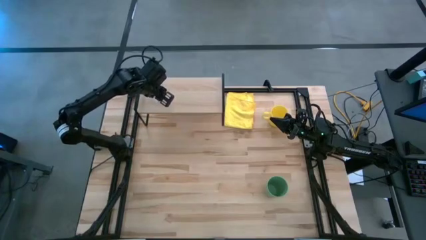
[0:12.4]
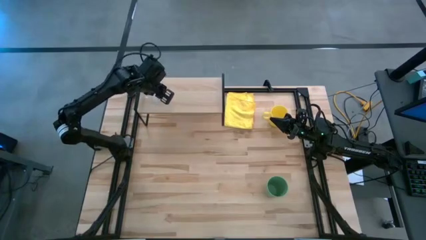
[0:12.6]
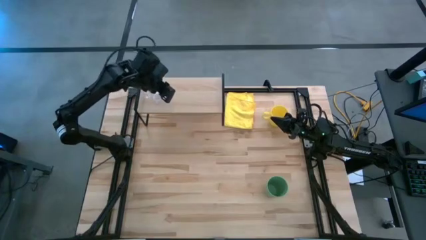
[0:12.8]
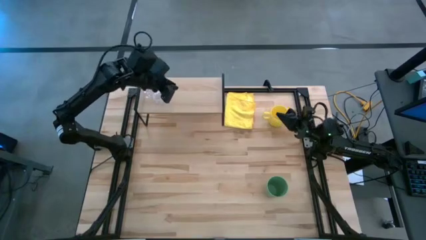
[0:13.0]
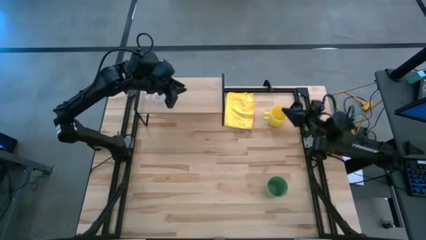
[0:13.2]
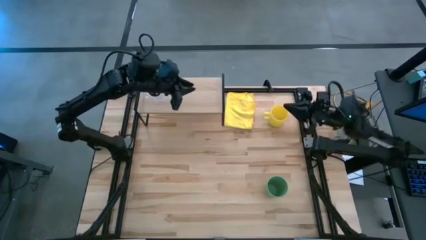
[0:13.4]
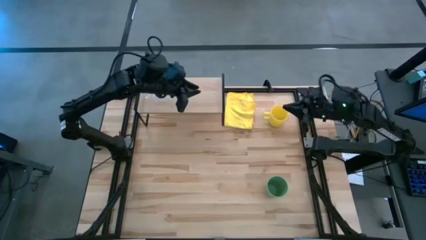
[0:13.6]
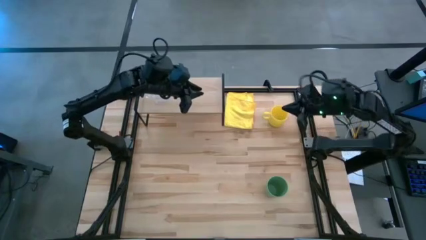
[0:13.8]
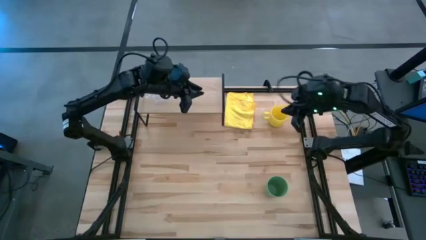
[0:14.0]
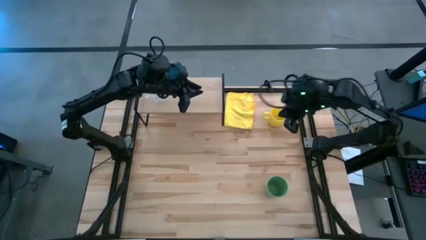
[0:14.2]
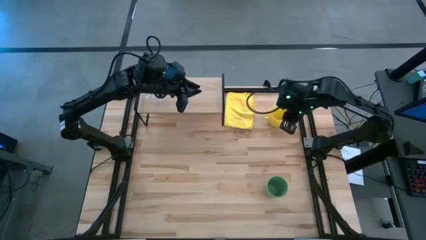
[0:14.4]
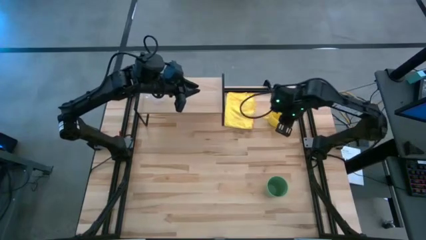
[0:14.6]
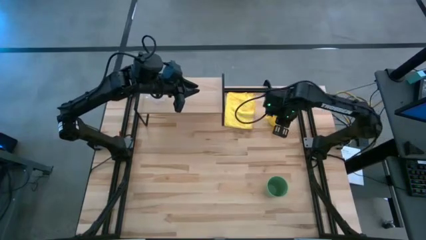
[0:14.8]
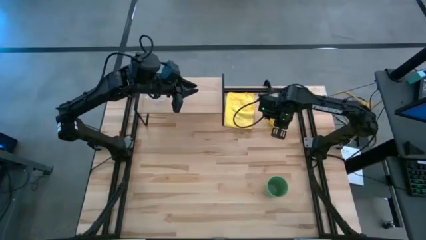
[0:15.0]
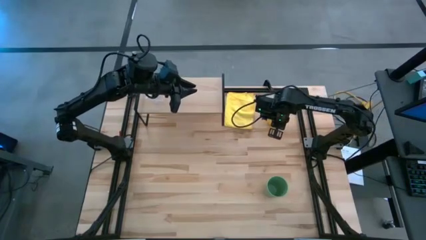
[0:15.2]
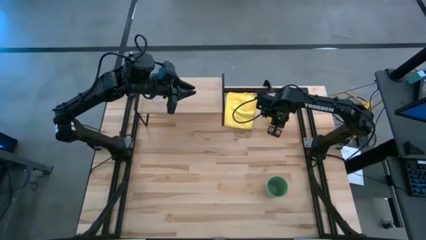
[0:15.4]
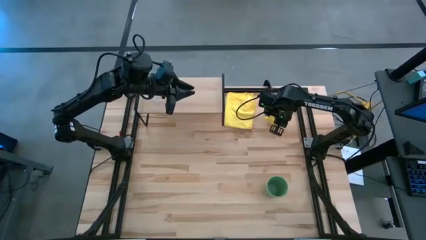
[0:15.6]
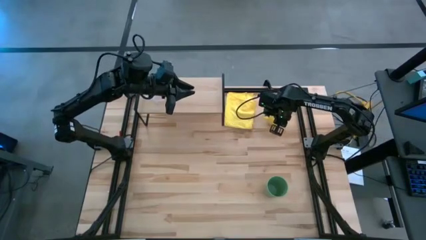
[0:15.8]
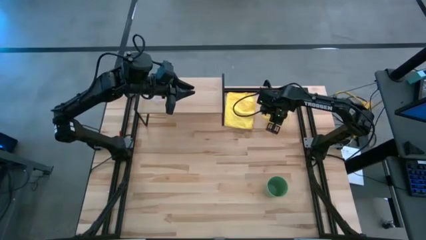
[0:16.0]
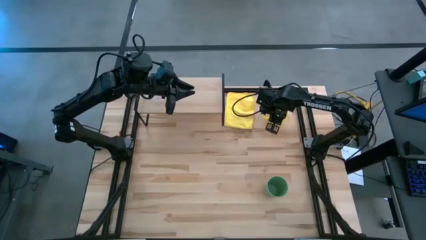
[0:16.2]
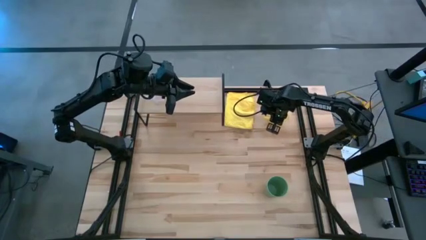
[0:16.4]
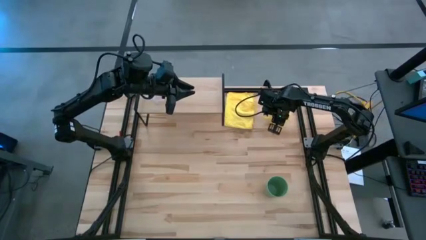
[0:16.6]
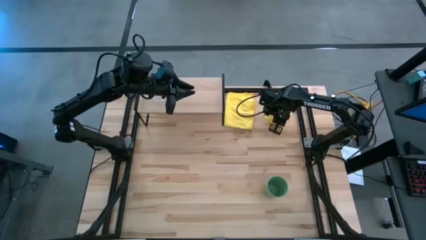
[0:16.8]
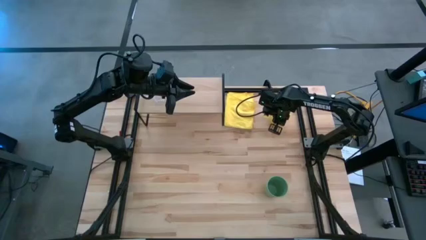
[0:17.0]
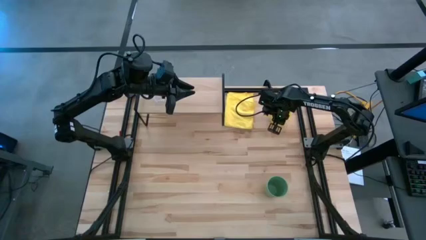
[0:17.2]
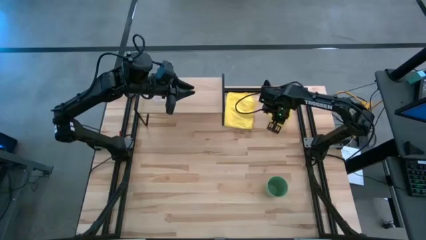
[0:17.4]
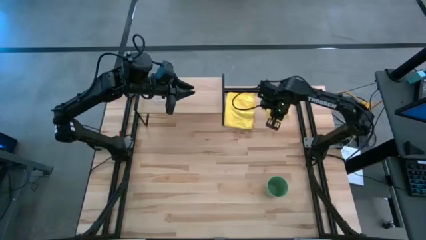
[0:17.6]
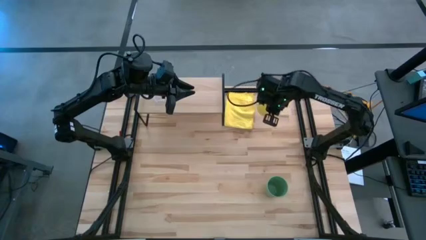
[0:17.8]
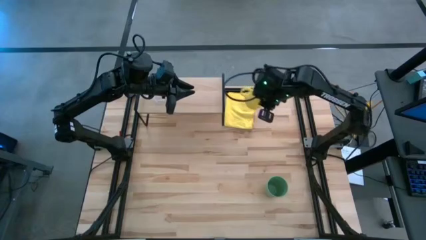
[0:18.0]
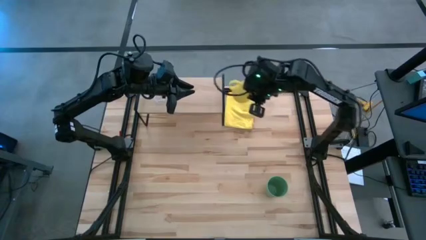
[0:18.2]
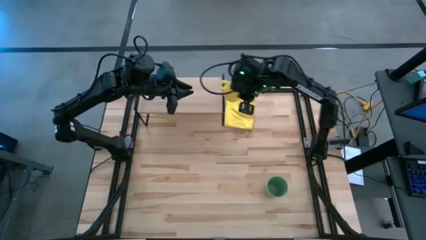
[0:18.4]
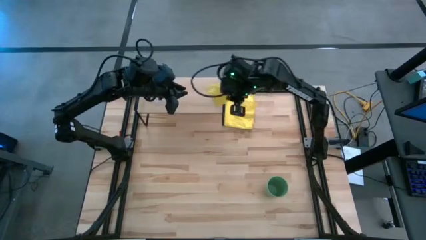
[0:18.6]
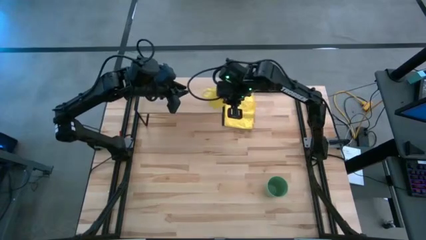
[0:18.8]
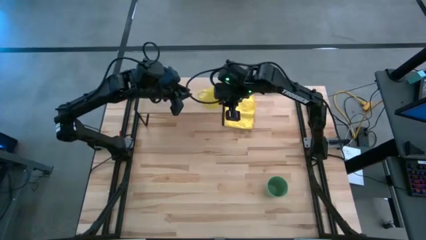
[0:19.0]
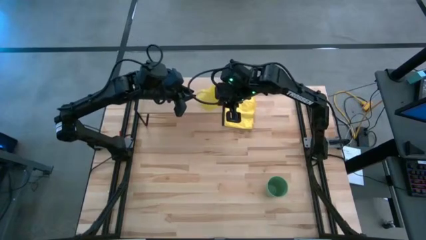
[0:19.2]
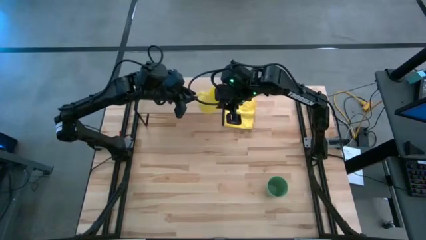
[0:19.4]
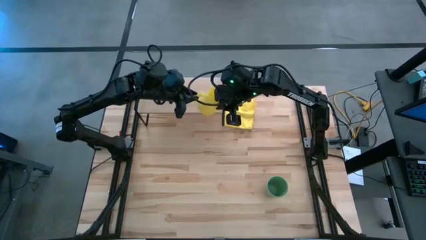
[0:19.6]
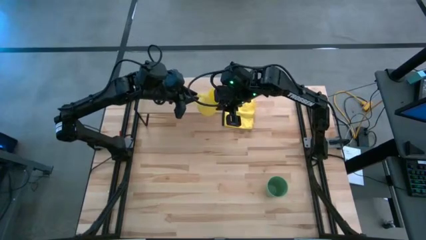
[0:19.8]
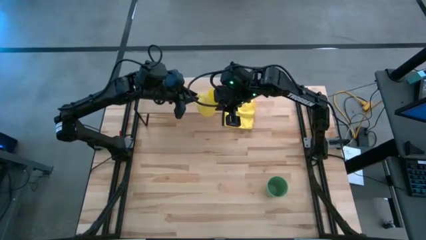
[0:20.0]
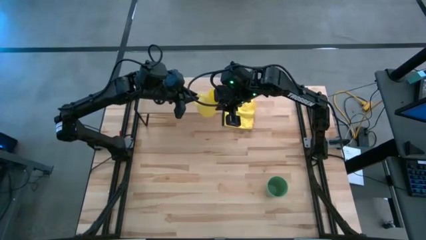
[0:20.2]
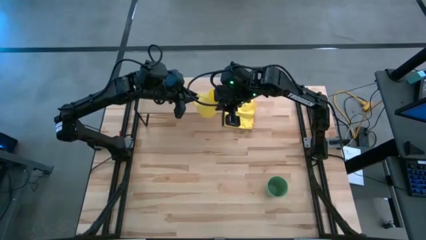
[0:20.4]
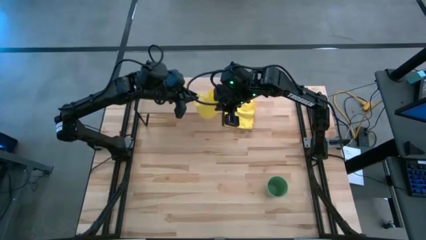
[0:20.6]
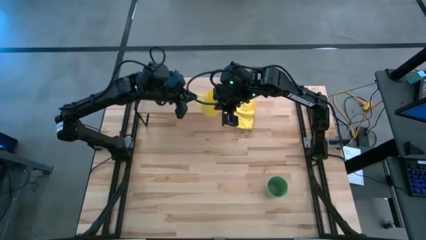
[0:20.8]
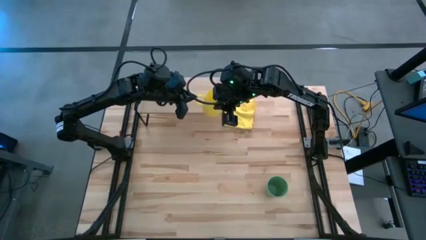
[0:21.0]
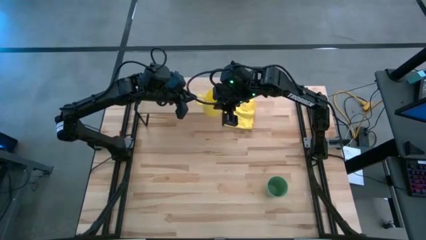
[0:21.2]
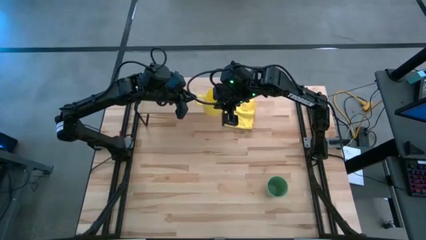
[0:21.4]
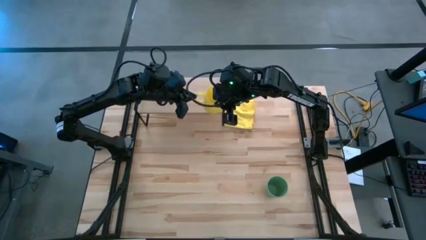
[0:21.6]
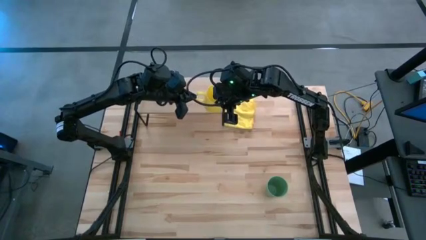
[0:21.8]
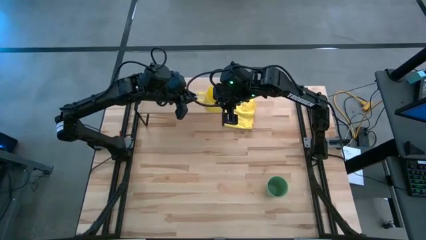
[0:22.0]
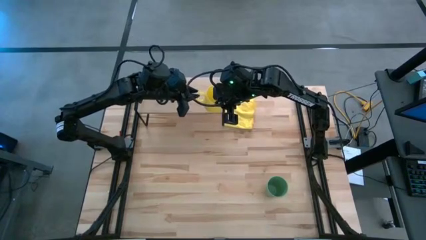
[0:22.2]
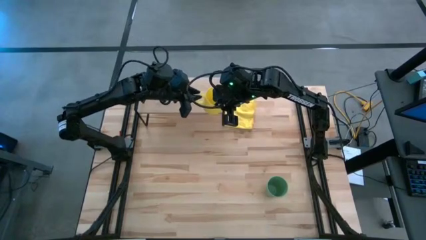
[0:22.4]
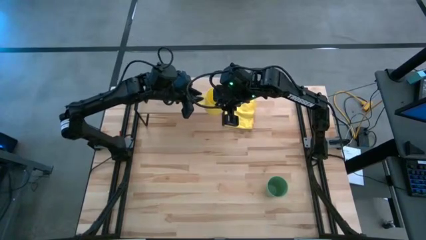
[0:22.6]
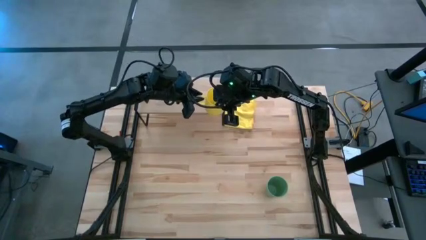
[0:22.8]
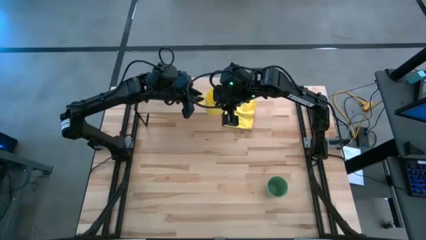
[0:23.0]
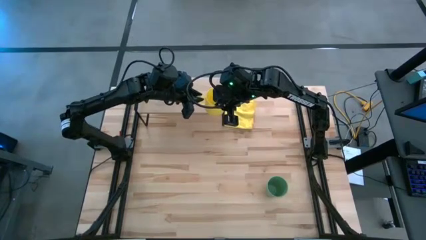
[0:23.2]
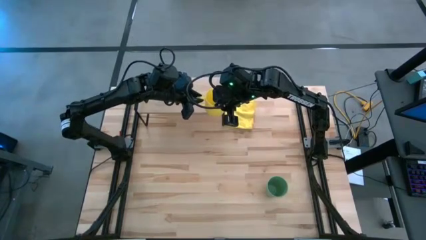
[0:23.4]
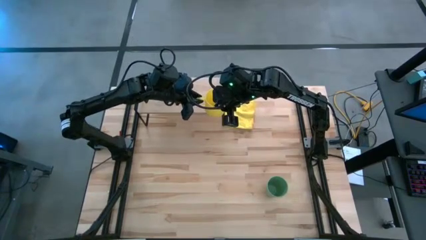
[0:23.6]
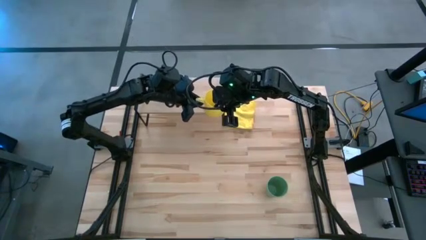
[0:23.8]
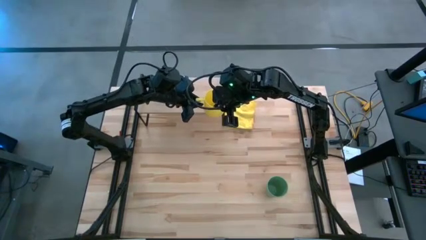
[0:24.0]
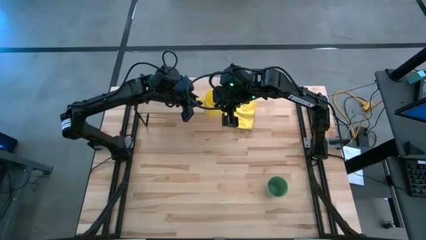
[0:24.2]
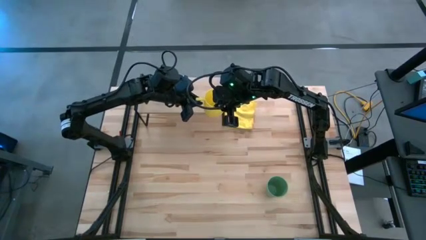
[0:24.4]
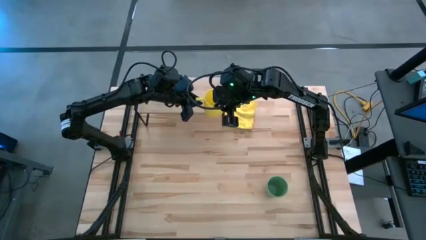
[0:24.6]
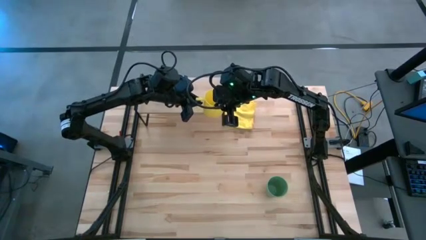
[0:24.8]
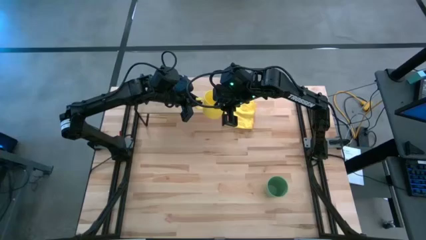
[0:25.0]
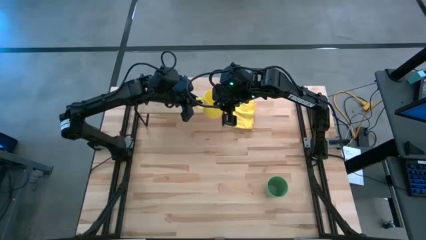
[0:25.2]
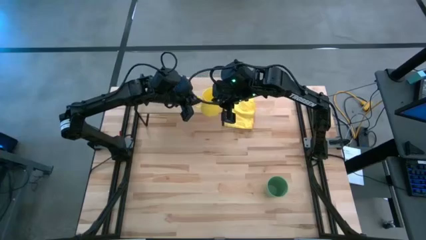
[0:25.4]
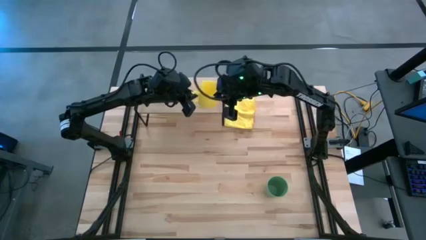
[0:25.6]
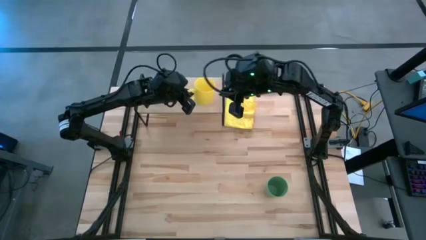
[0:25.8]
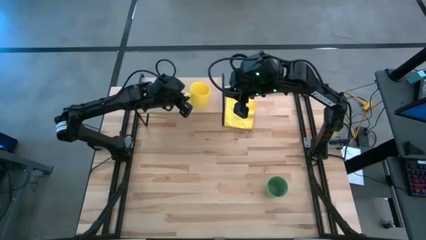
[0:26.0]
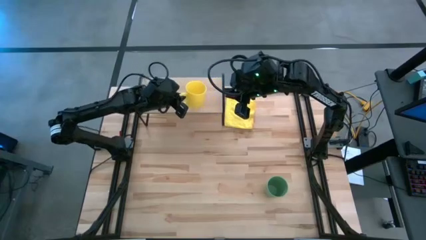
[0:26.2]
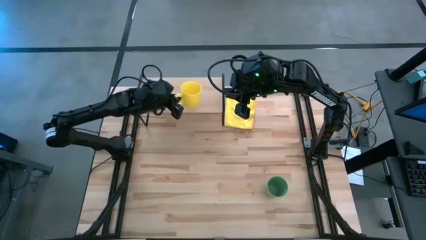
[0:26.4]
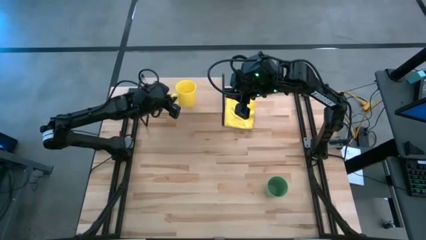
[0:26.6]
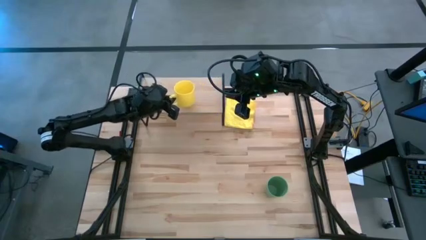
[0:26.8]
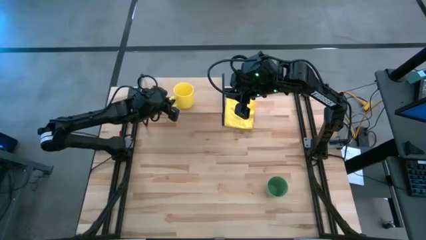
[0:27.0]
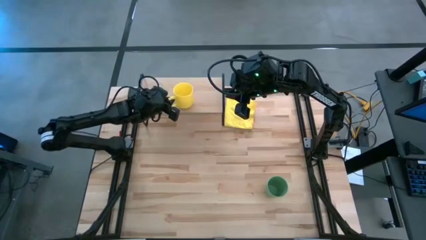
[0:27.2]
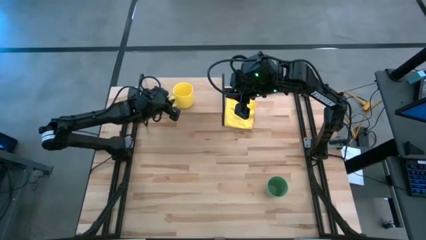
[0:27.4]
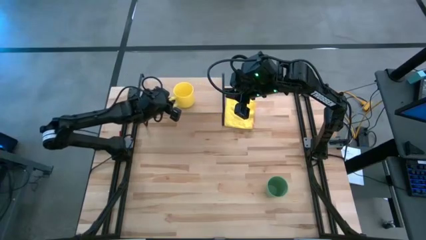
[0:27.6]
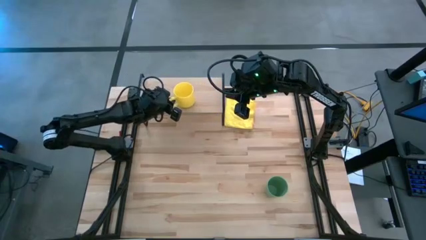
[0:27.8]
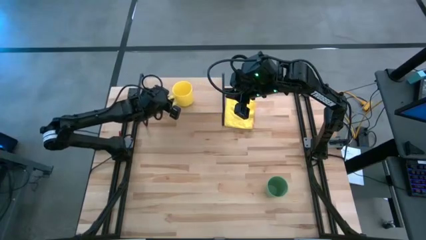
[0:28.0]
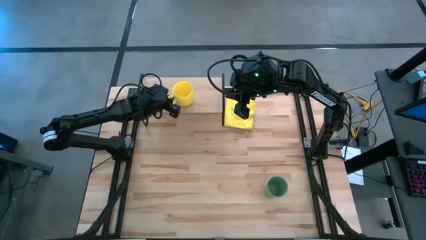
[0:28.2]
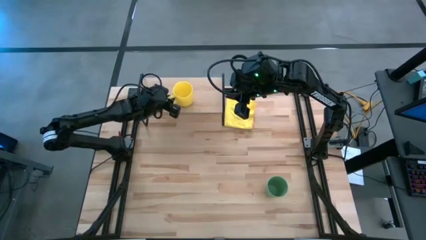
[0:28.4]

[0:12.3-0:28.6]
Task: Stack small to large cups/mugs on shelf
Put the yellow mug on the shelf
